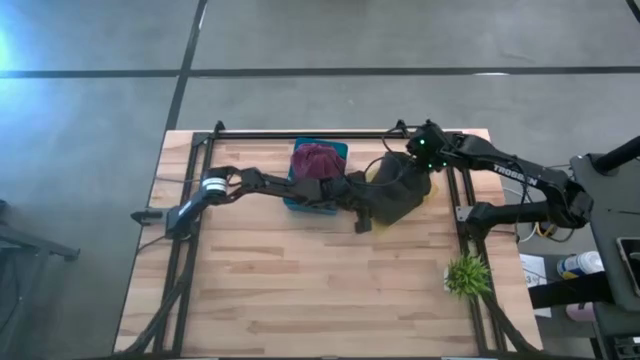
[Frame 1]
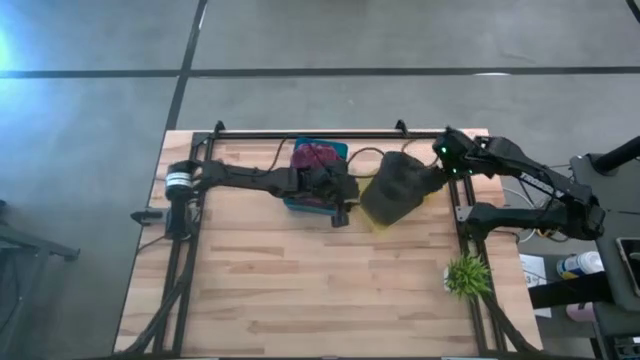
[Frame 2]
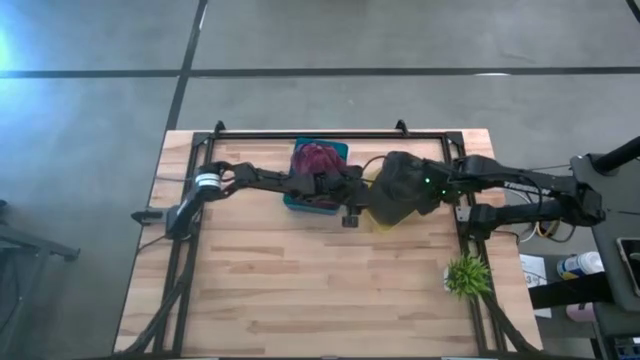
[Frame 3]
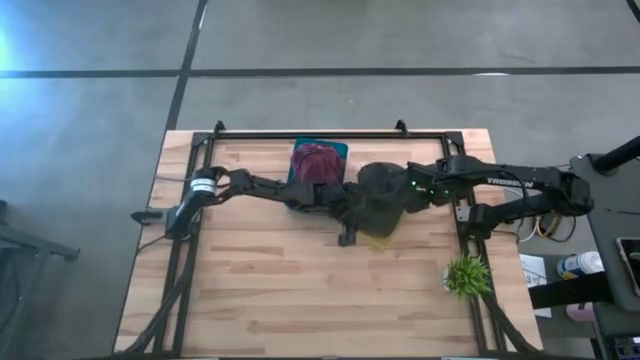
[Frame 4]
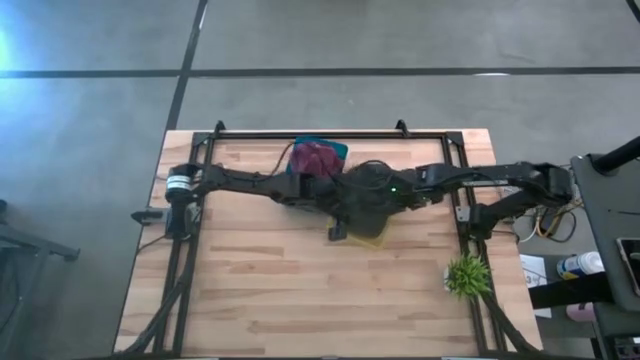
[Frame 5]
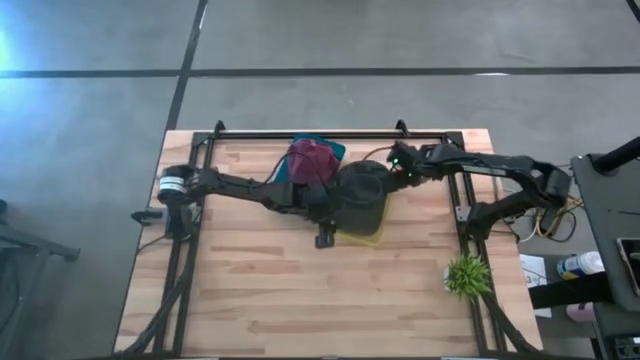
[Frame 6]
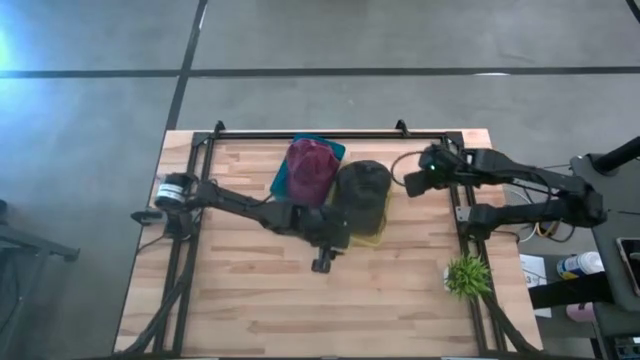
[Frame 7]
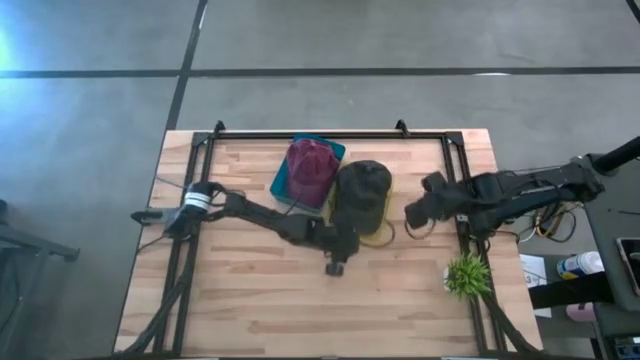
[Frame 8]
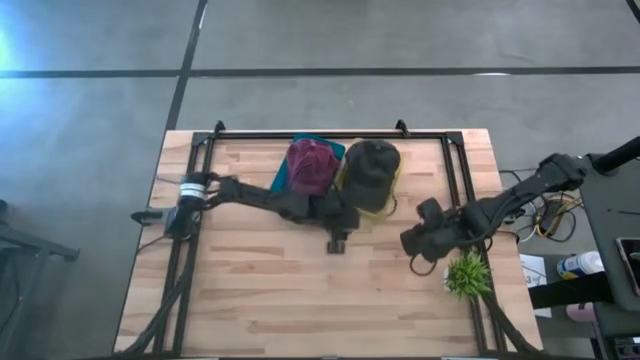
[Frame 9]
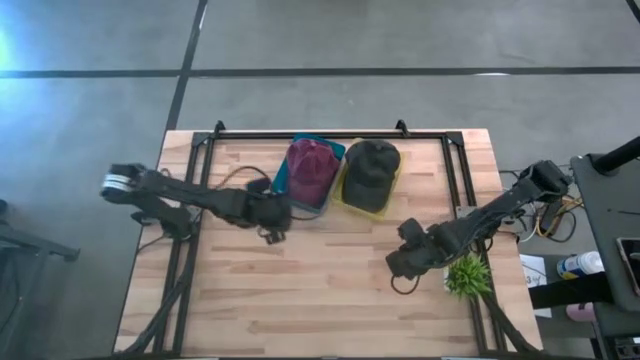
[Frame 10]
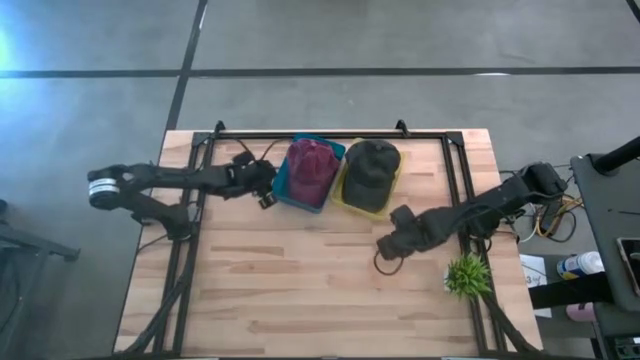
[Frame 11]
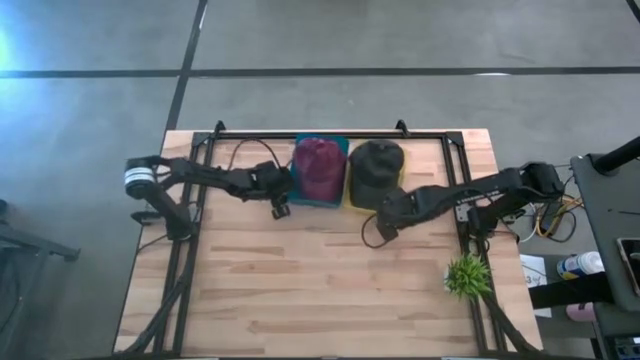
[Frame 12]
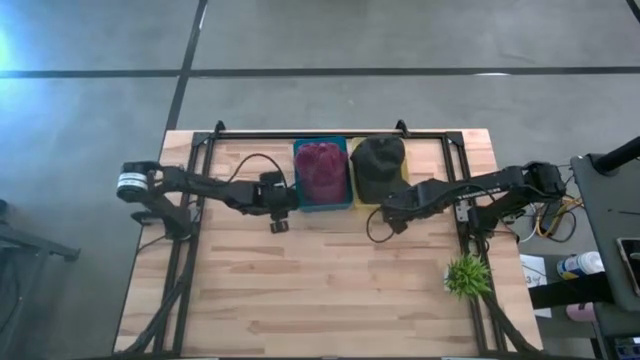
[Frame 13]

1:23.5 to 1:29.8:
Task: Pick & Place hat
Adjust the bins on the table

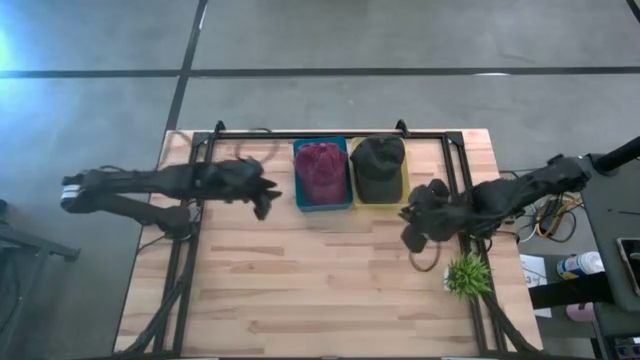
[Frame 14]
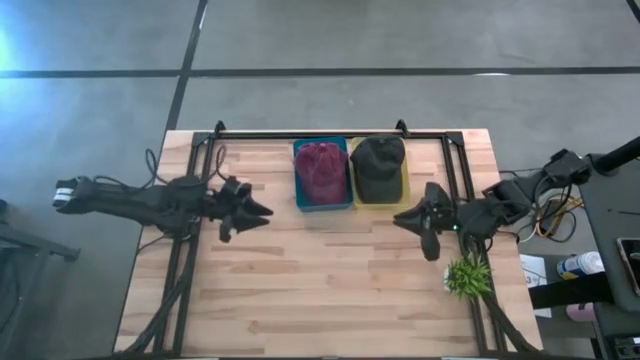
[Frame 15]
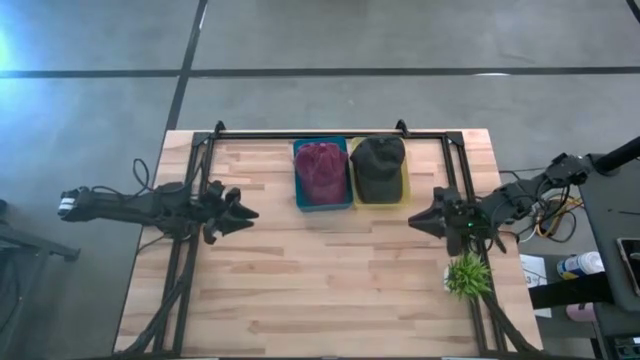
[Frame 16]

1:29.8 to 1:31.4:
Return to Home Position

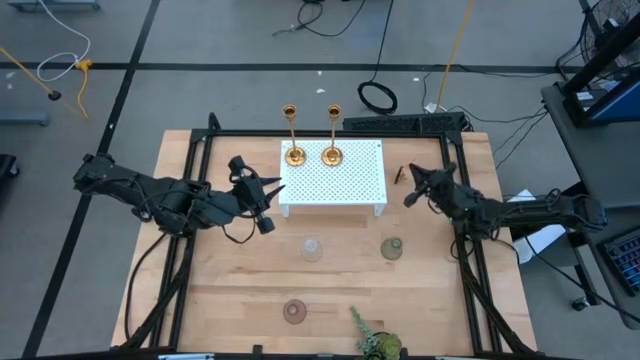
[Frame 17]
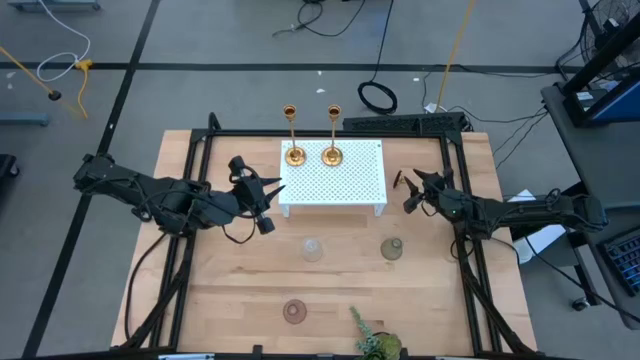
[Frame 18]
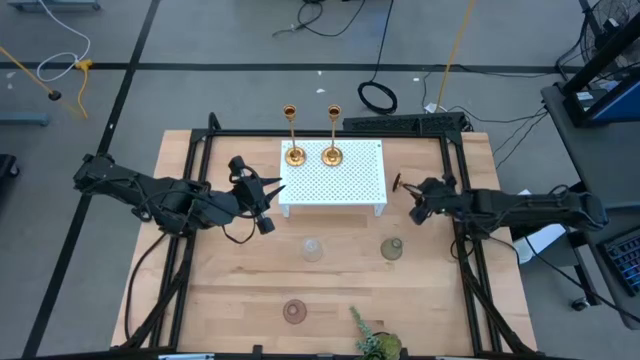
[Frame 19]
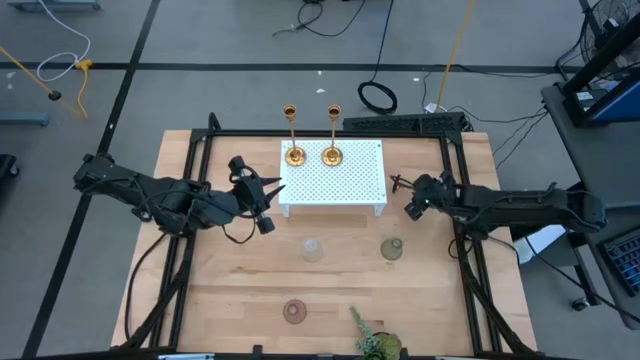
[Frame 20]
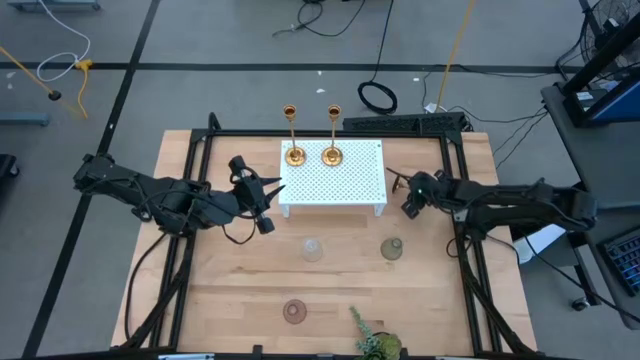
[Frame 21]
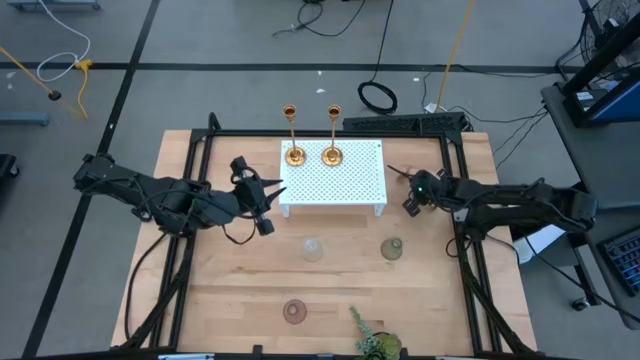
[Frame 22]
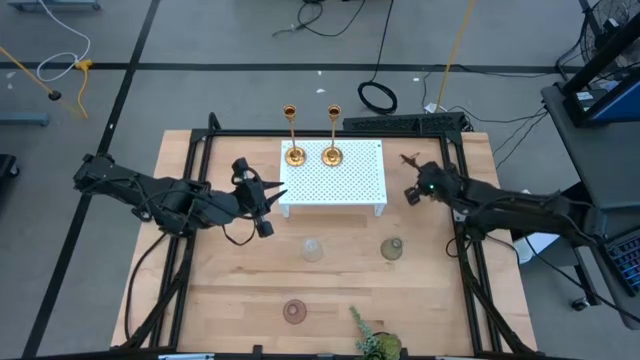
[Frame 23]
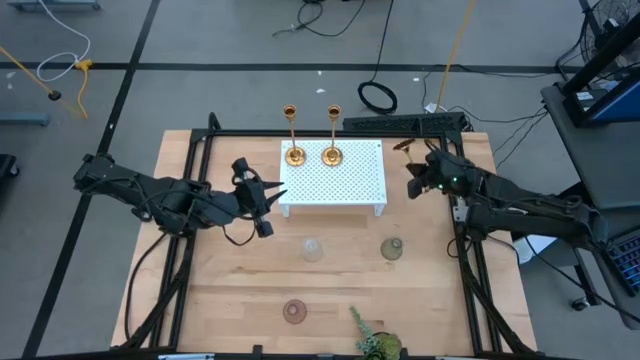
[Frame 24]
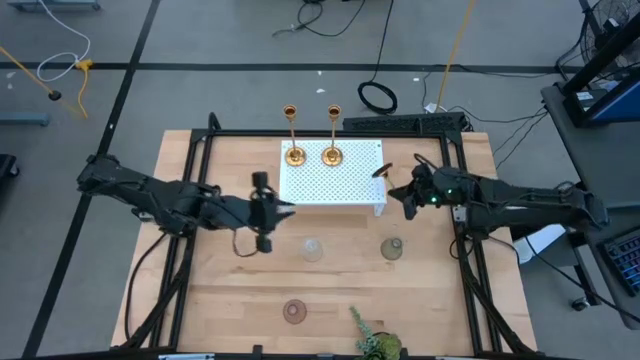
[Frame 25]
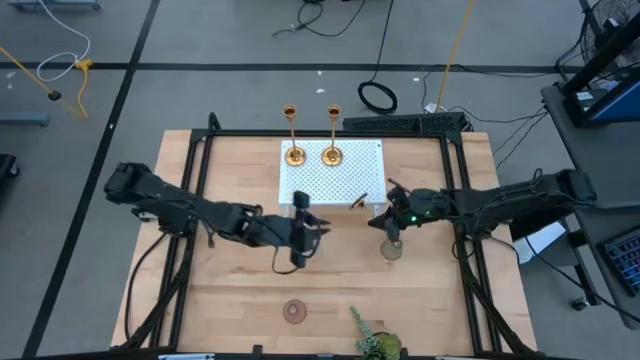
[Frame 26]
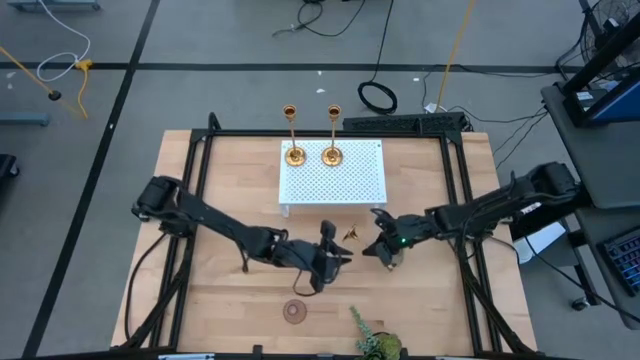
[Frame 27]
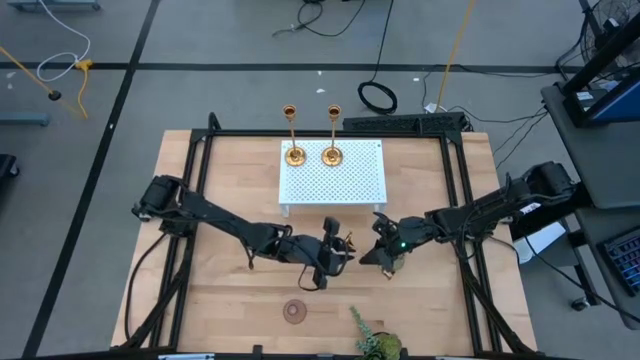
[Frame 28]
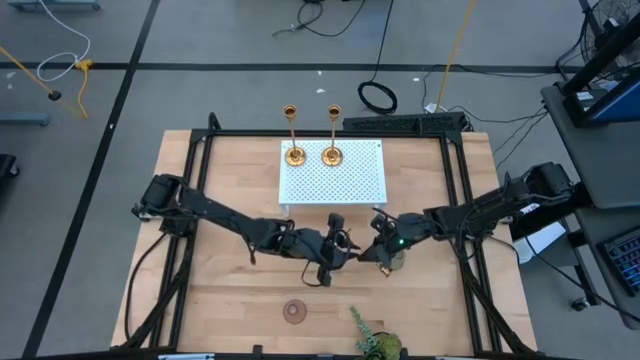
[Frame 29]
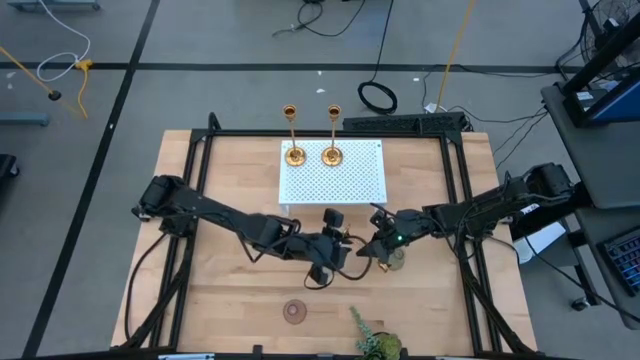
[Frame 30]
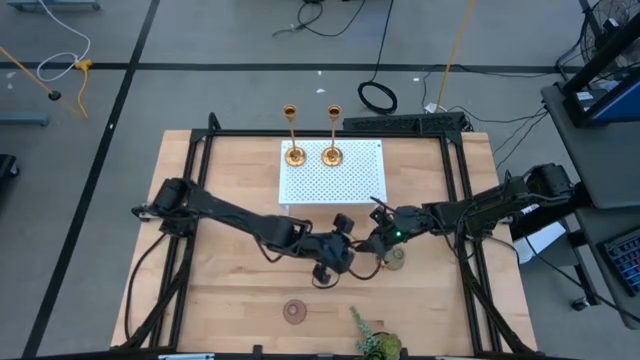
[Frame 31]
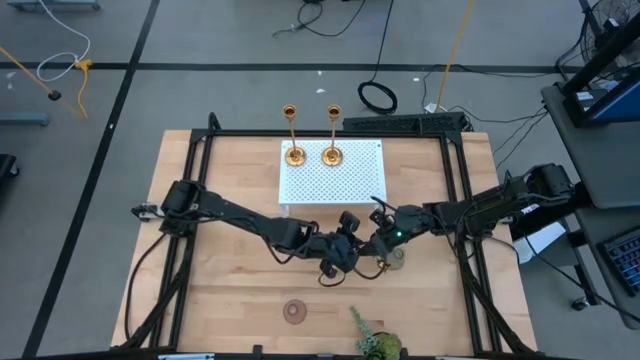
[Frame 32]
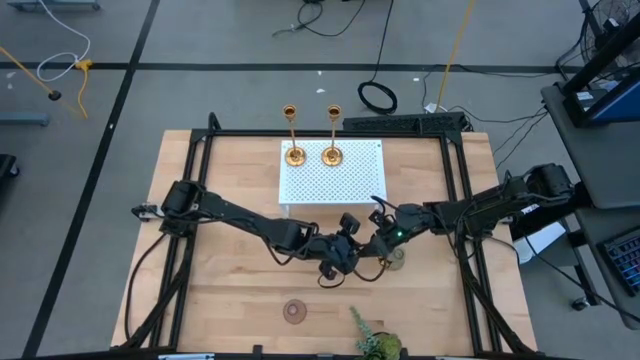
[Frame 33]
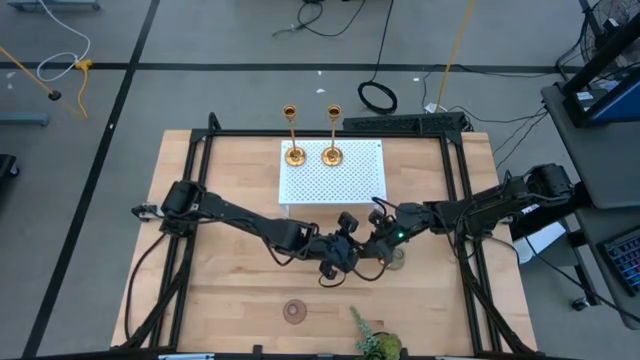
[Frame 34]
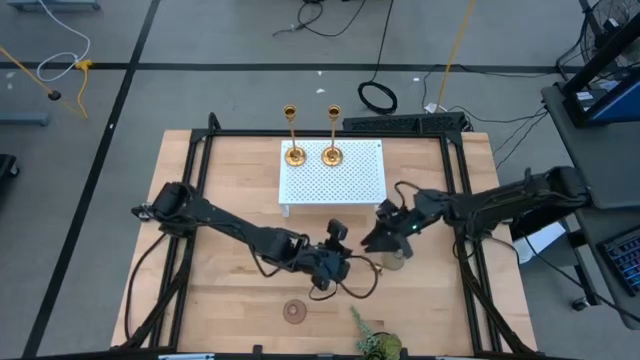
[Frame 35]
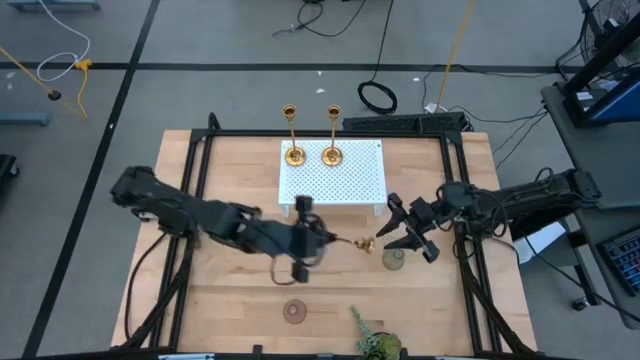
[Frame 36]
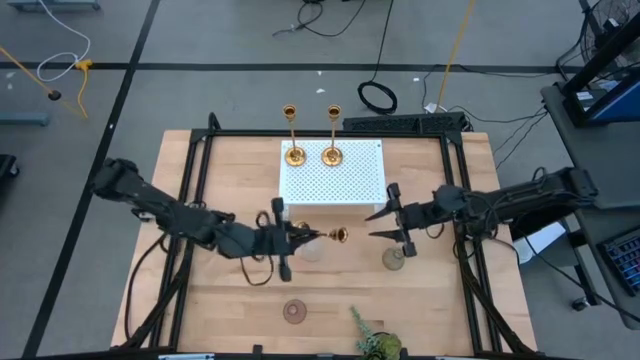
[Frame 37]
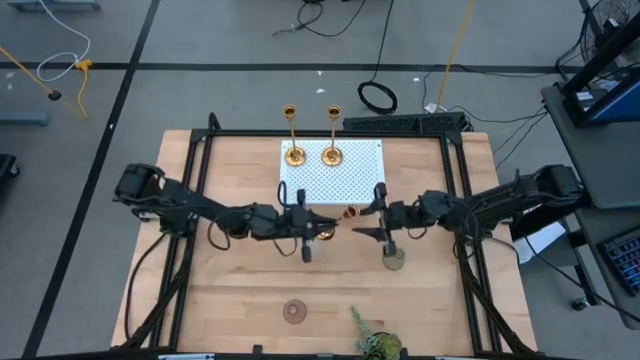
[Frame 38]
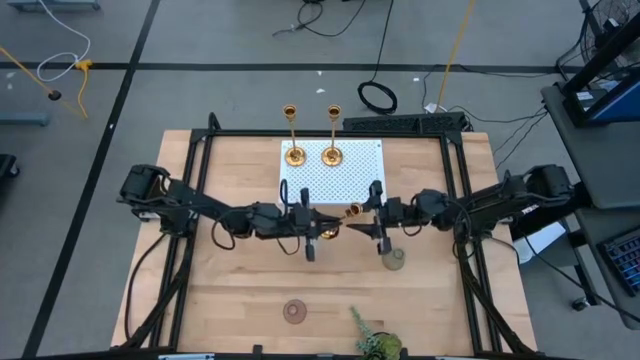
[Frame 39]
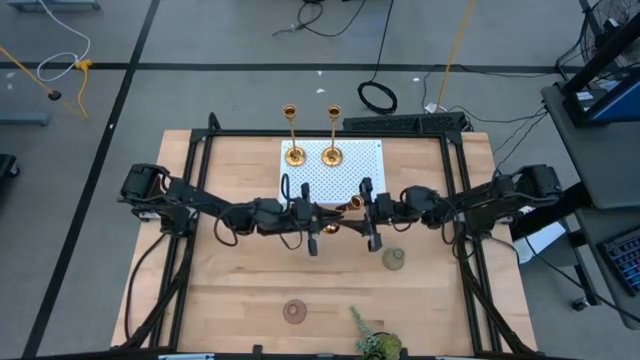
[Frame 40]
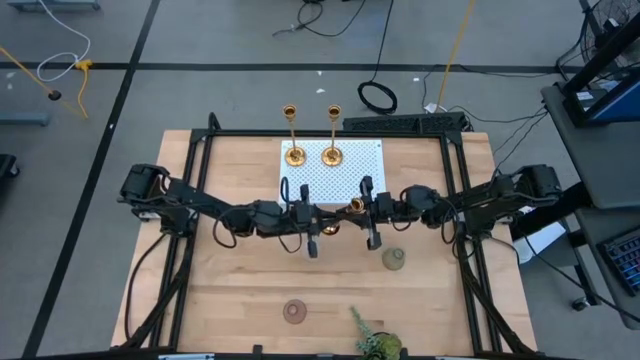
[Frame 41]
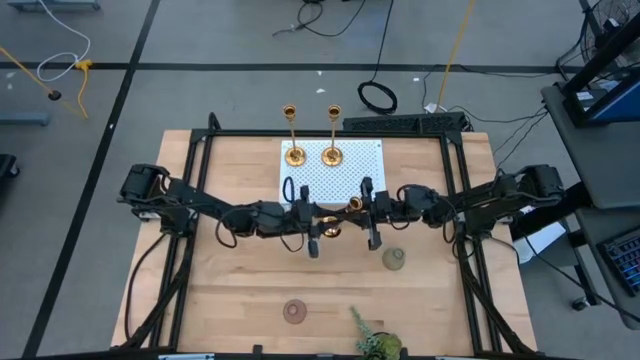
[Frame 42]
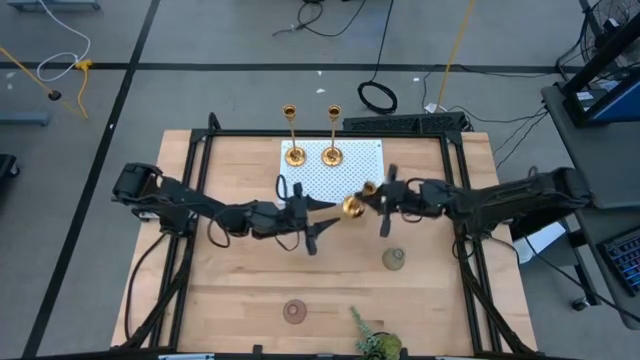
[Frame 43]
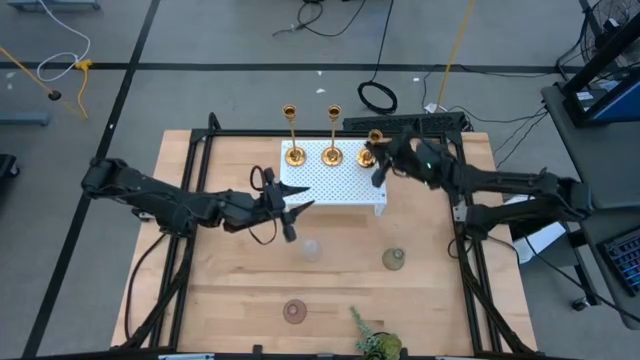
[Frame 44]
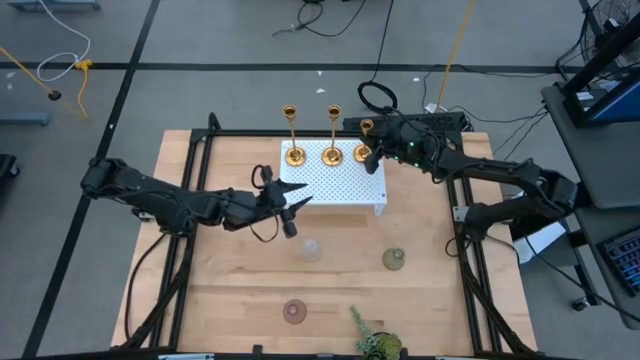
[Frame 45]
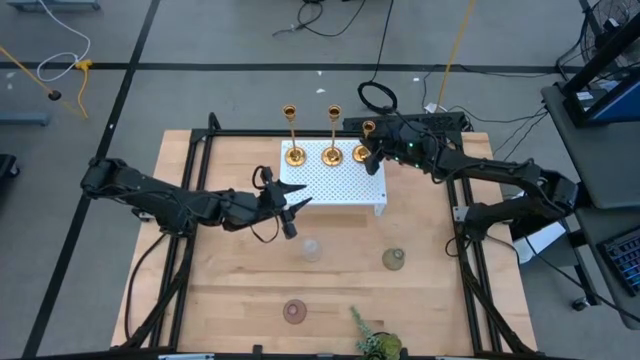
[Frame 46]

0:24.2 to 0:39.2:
Task: Pick & Place candle stick holders
Put the gold candle holder on the shelf
